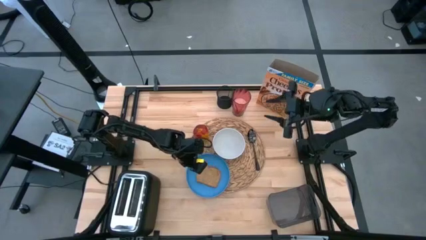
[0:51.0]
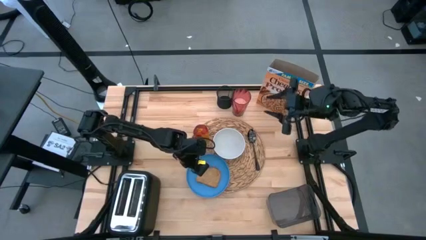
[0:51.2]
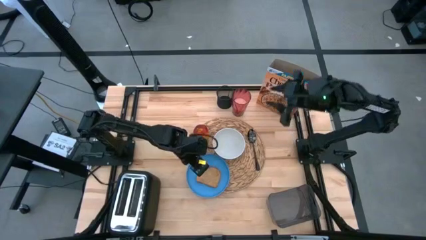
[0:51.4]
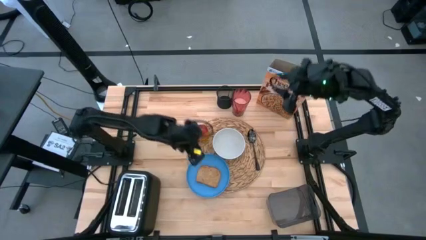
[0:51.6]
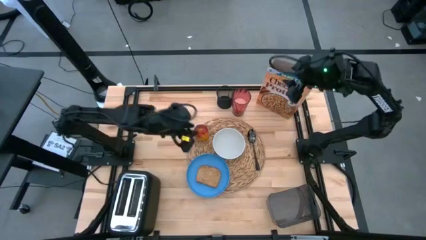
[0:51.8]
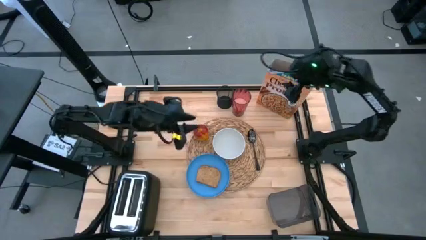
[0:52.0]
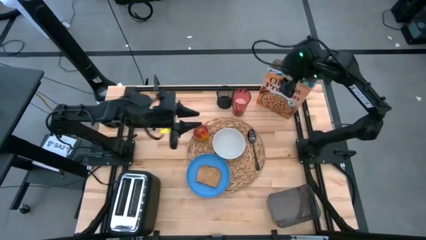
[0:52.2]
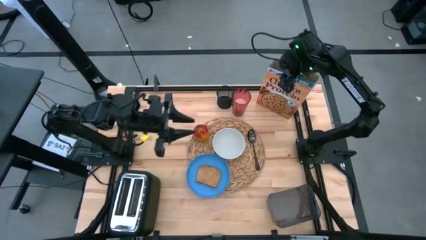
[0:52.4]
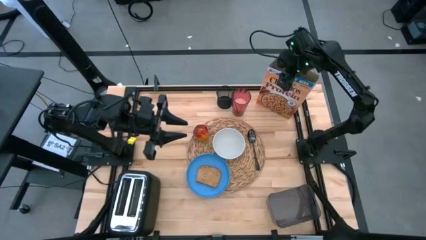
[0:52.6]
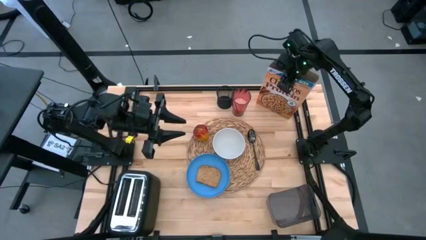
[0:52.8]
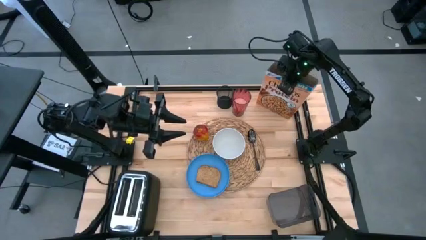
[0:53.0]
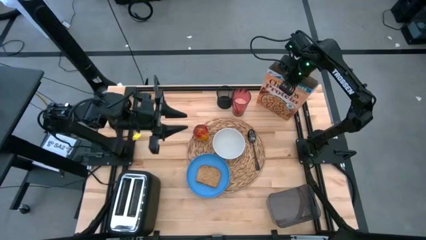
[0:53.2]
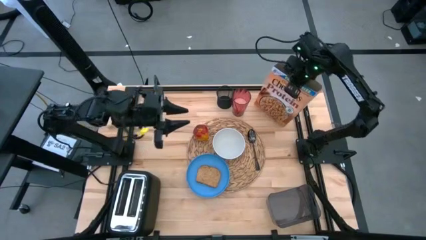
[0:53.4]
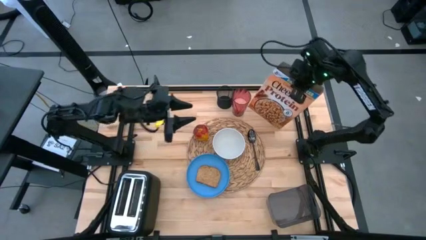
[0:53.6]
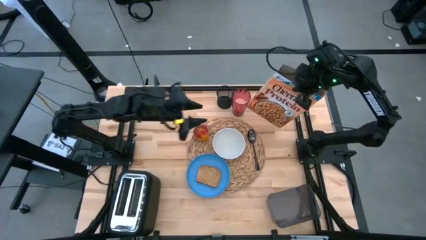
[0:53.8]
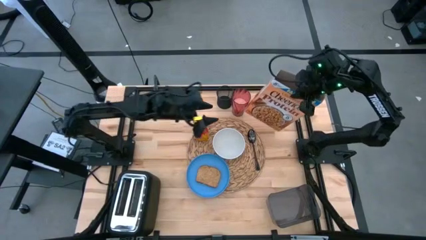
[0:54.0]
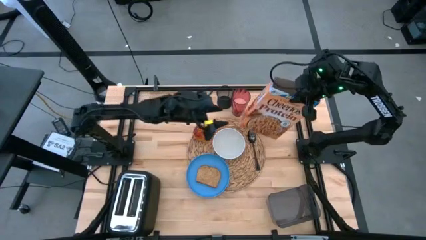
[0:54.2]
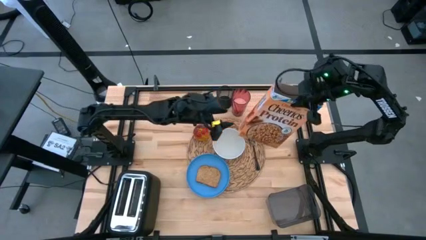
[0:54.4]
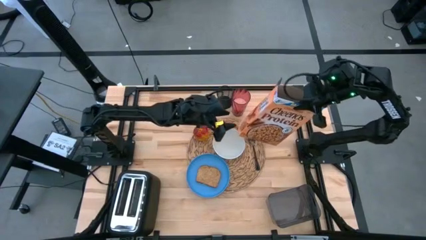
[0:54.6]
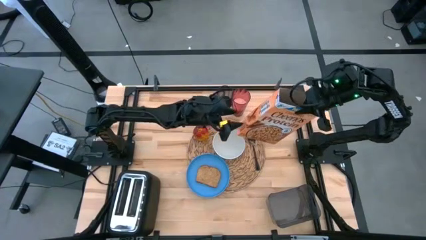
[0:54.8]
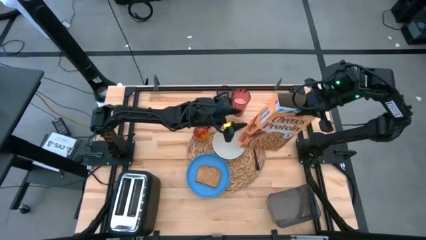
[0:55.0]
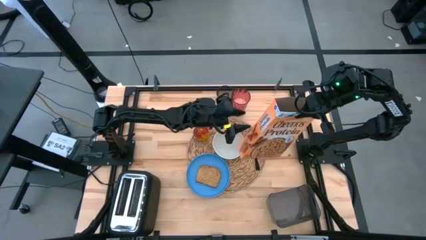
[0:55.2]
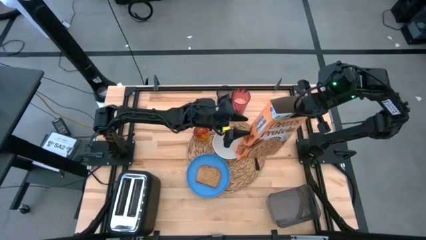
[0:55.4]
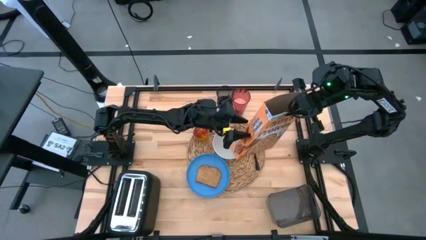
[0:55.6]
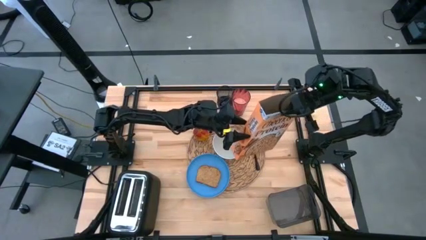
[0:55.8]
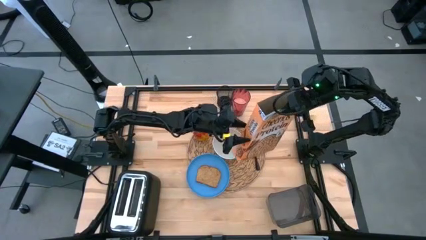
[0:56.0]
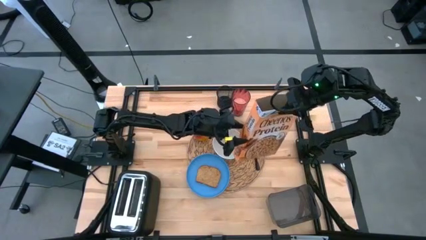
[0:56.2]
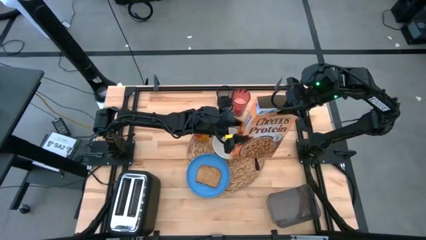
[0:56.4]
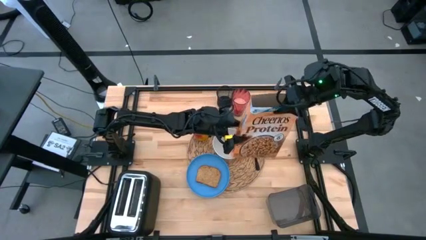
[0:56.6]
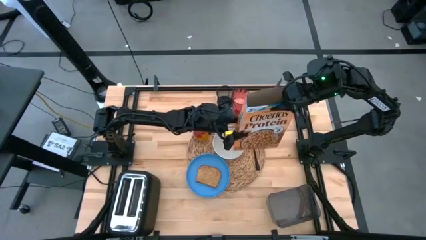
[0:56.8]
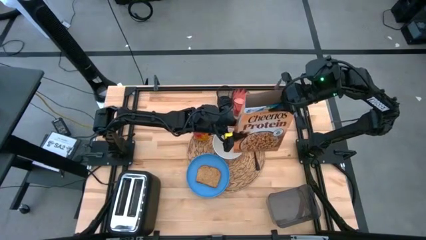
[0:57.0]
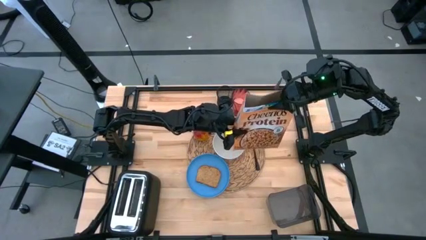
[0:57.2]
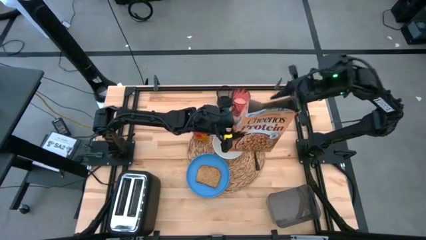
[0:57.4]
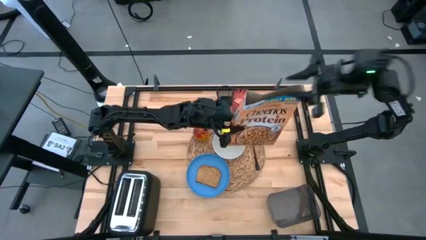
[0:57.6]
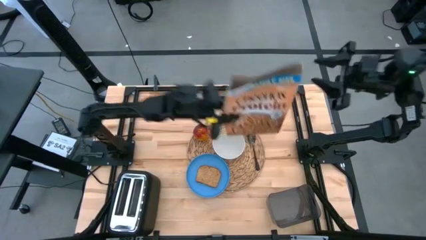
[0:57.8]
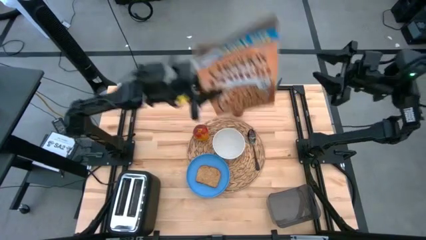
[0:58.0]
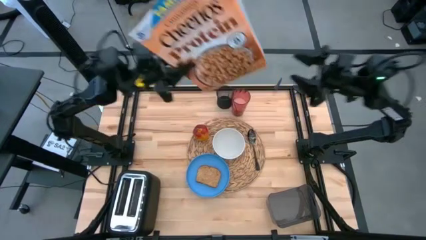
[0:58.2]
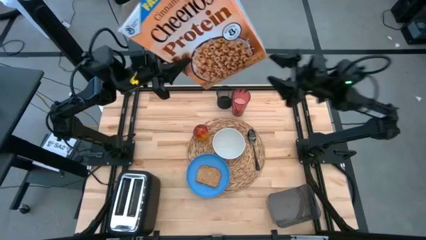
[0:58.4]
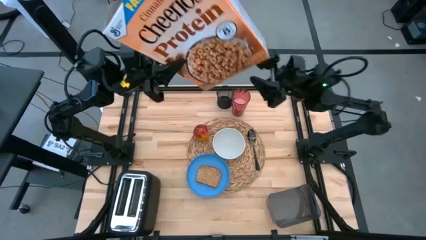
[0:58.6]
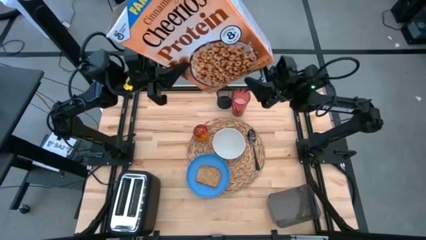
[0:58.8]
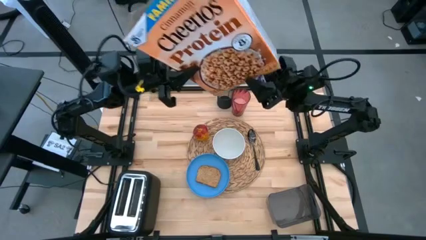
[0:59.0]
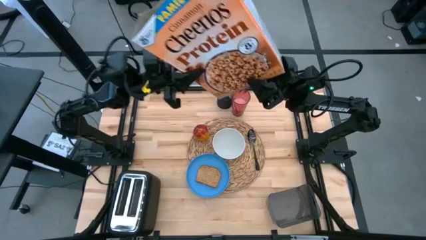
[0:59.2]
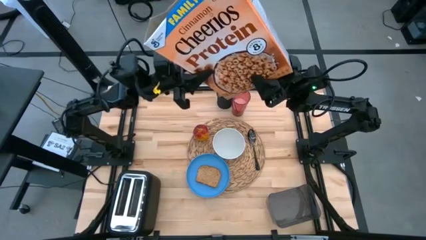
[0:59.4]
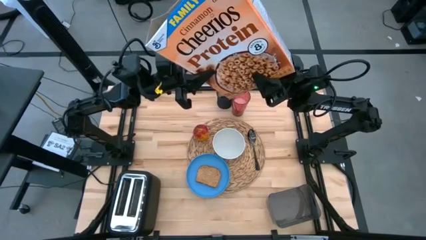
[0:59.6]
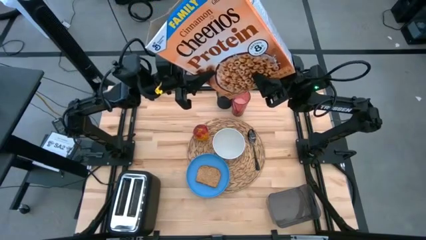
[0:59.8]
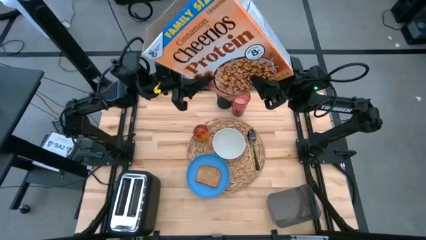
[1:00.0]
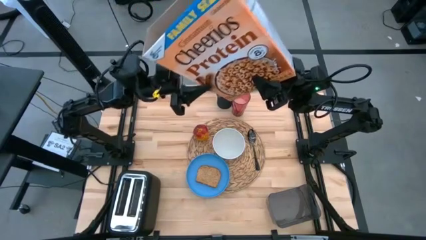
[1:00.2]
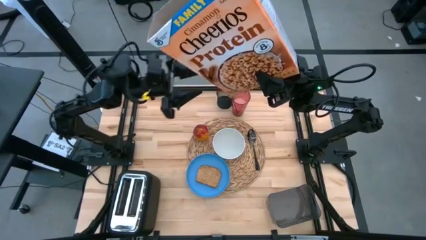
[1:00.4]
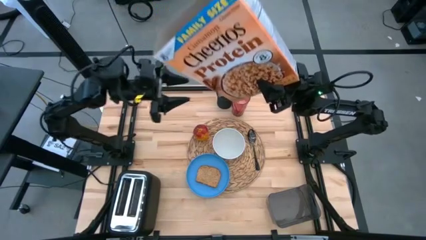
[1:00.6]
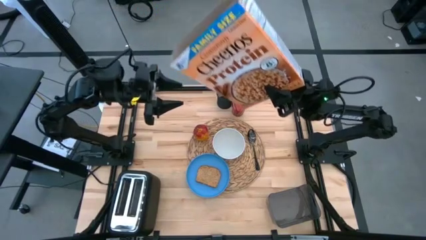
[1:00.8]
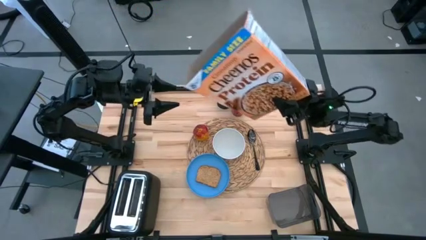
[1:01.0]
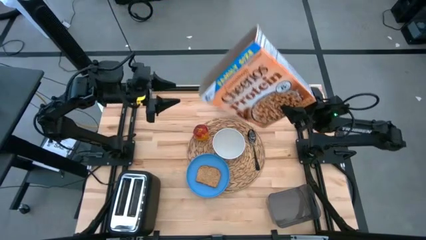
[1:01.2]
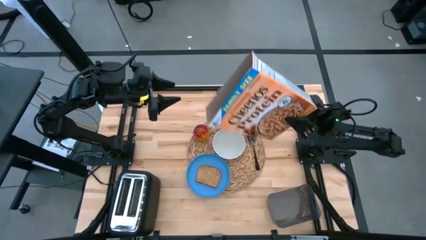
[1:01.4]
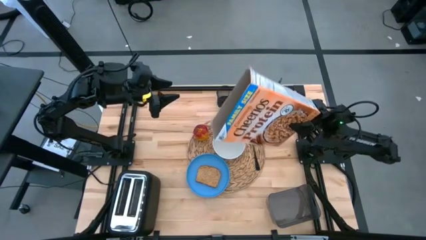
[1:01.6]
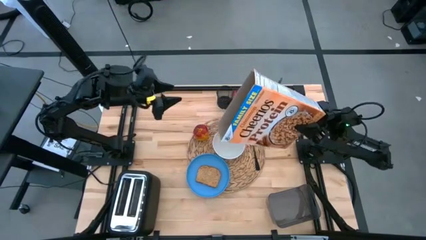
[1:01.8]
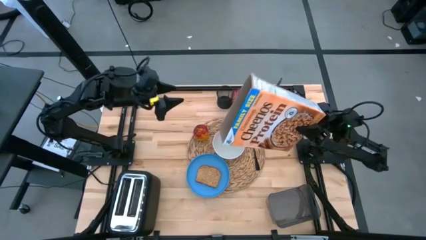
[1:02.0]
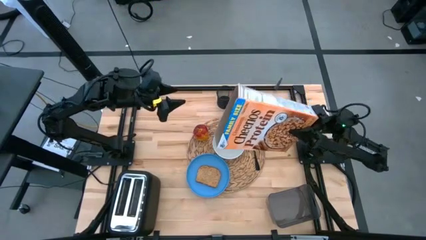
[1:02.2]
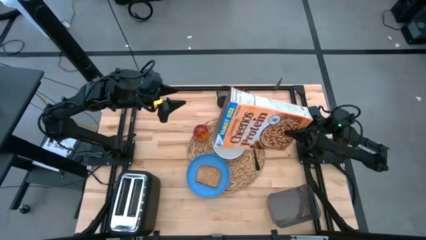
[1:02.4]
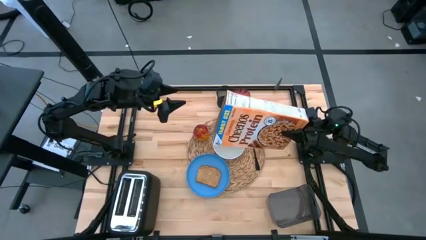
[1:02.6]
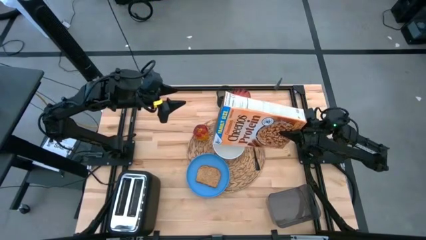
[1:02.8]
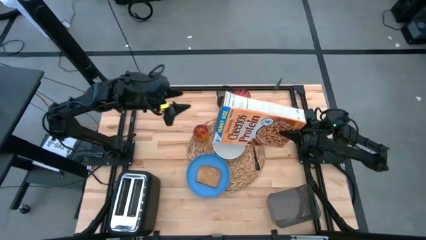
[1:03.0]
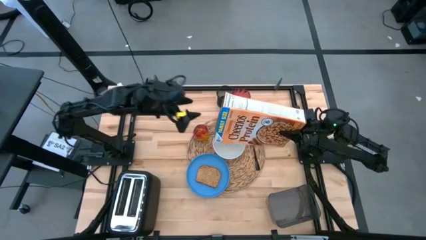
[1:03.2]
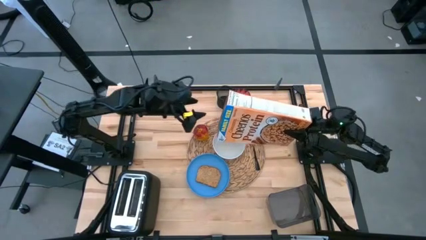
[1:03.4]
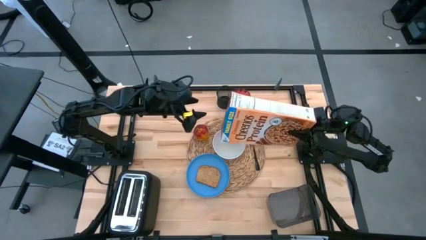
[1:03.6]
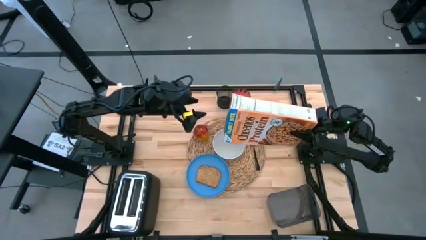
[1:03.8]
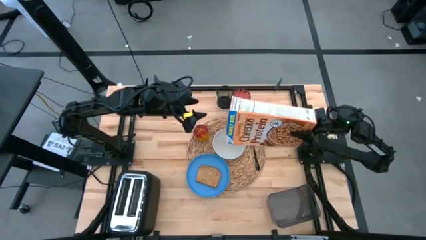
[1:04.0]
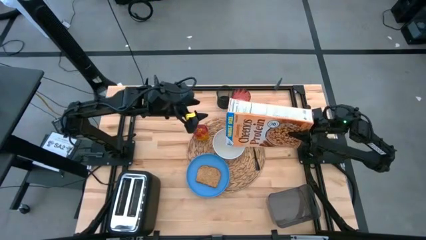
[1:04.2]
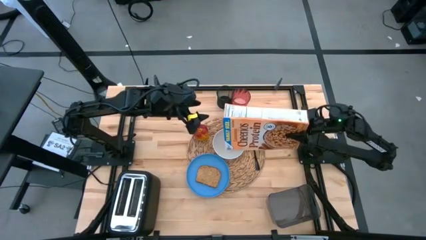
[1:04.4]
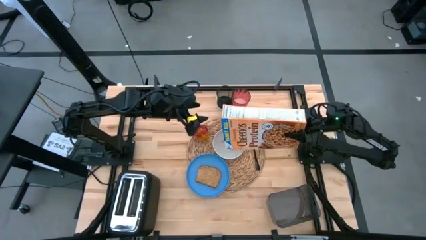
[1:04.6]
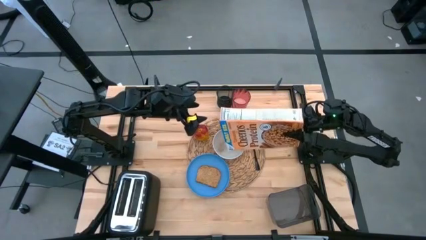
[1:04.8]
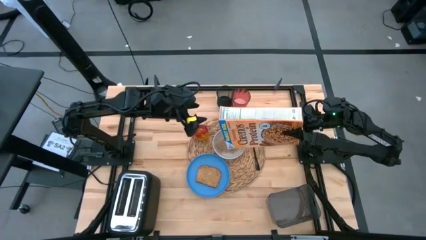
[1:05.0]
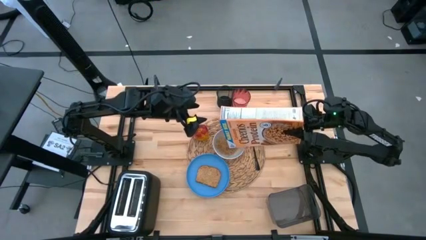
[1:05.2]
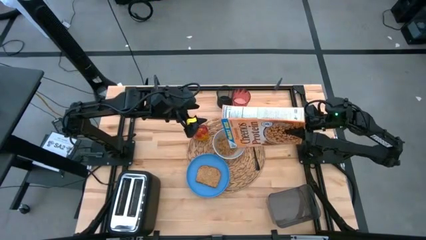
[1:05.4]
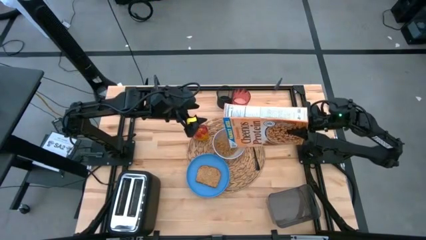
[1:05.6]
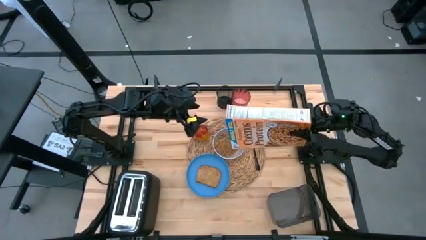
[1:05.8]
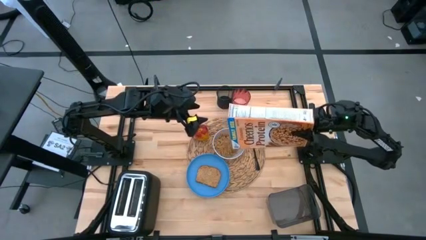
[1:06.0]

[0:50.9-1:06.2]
Task: Arrange a breakfast setting
Pour the brown cereal from the orange cereal box into the white bowl
